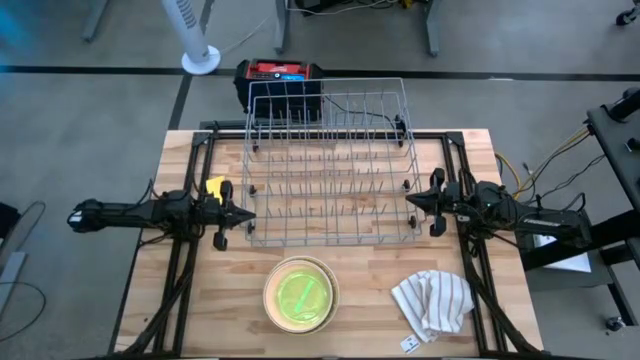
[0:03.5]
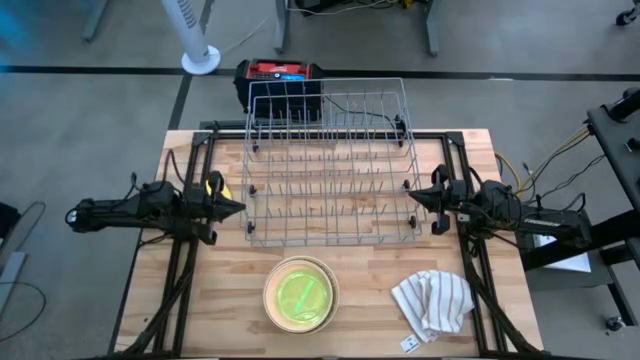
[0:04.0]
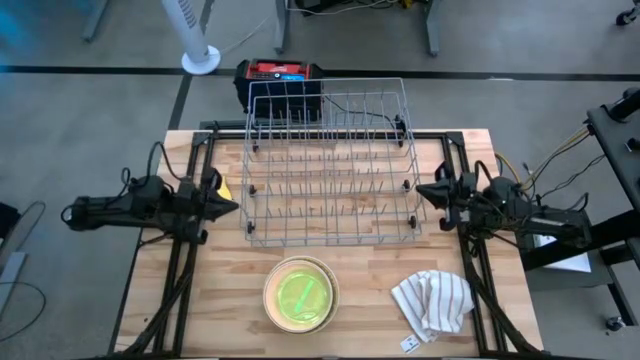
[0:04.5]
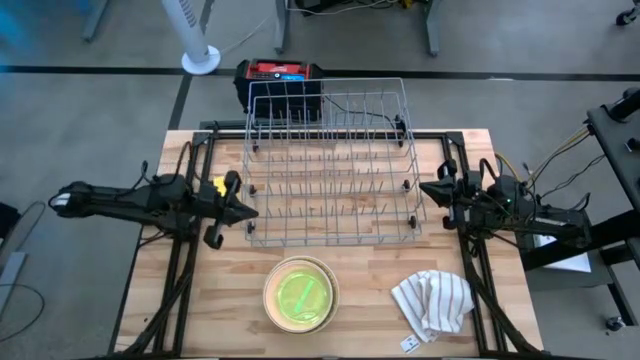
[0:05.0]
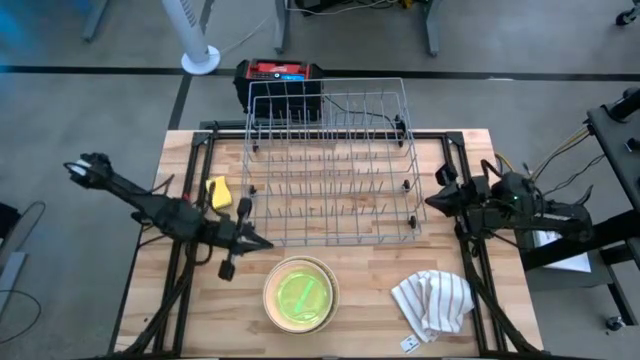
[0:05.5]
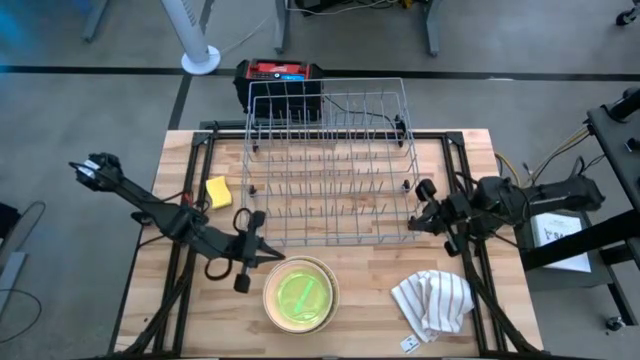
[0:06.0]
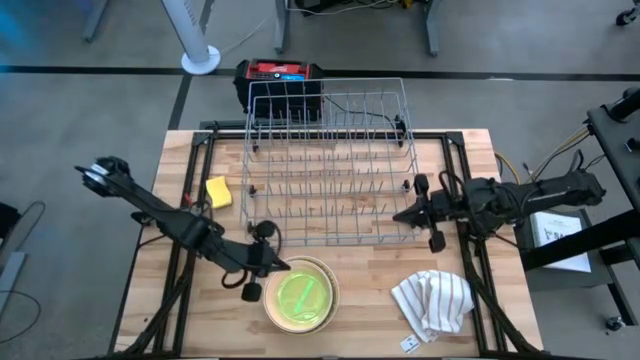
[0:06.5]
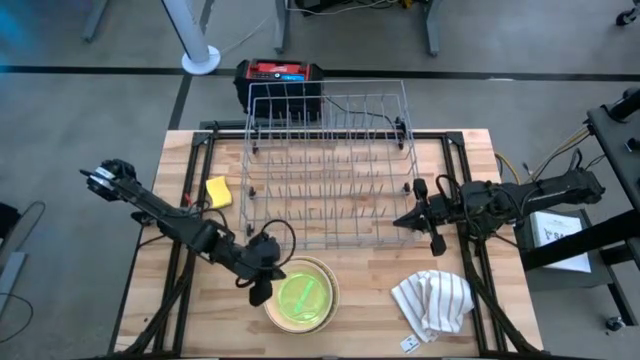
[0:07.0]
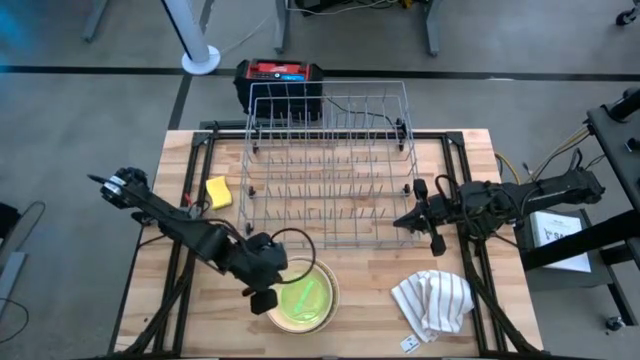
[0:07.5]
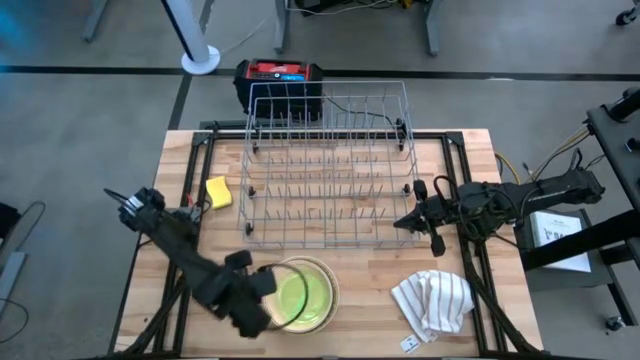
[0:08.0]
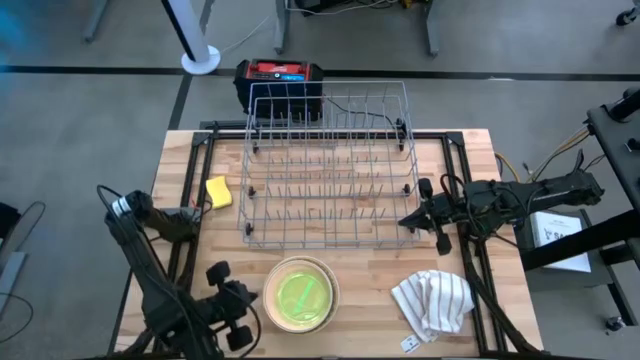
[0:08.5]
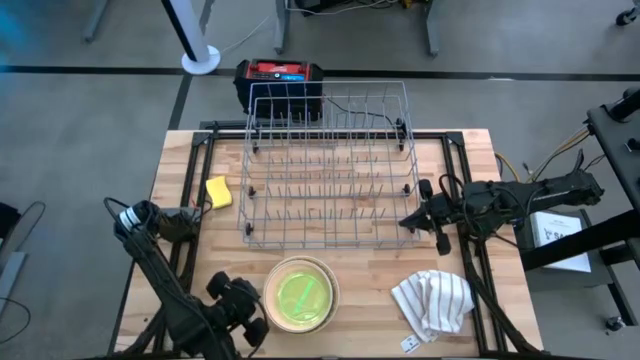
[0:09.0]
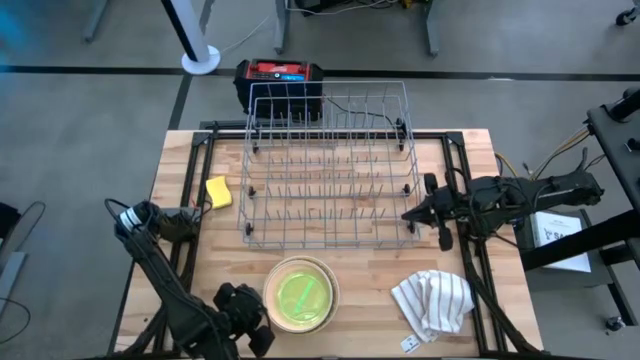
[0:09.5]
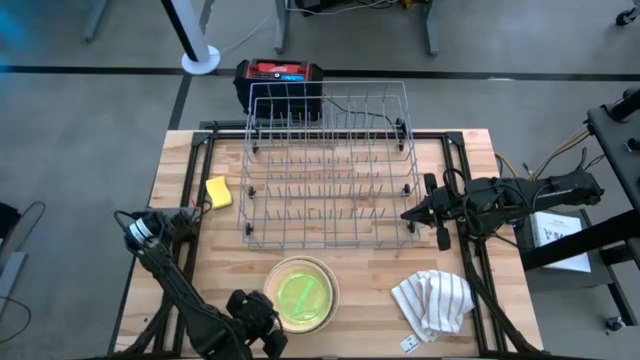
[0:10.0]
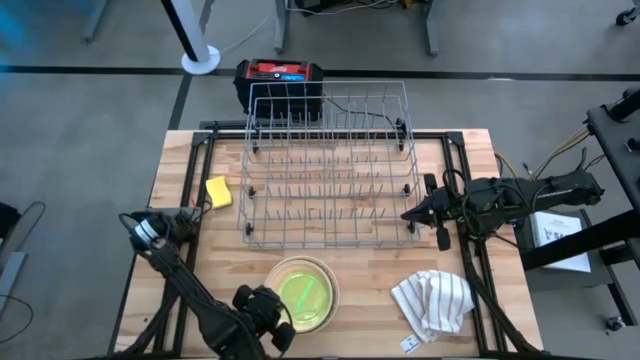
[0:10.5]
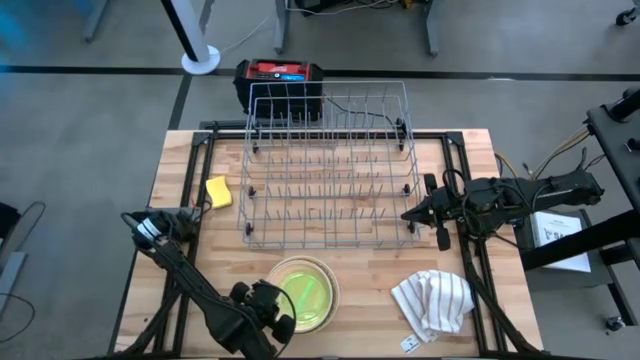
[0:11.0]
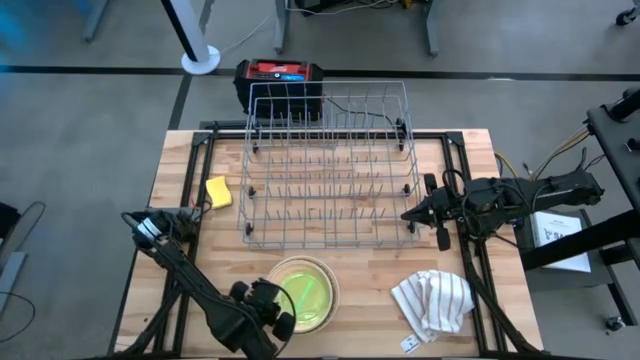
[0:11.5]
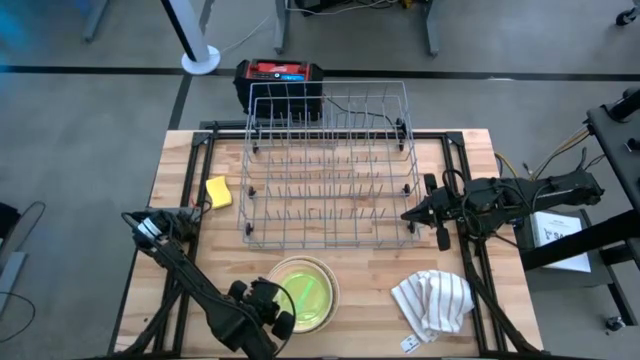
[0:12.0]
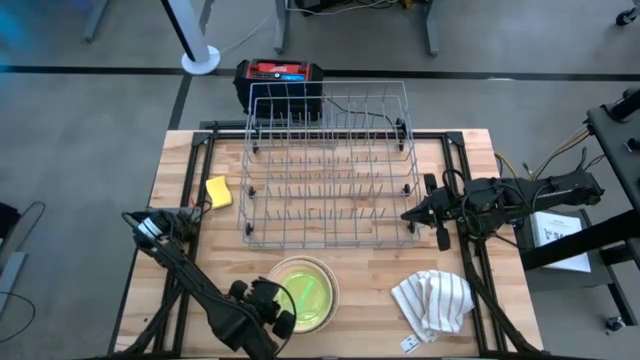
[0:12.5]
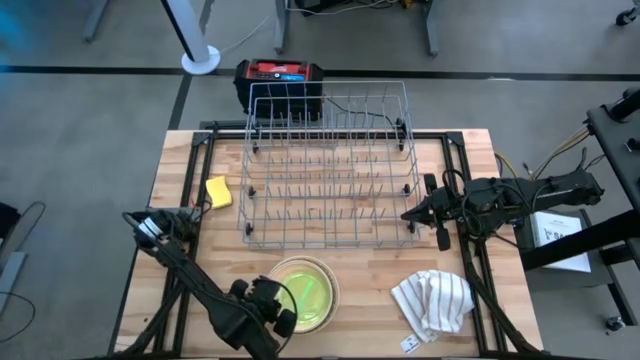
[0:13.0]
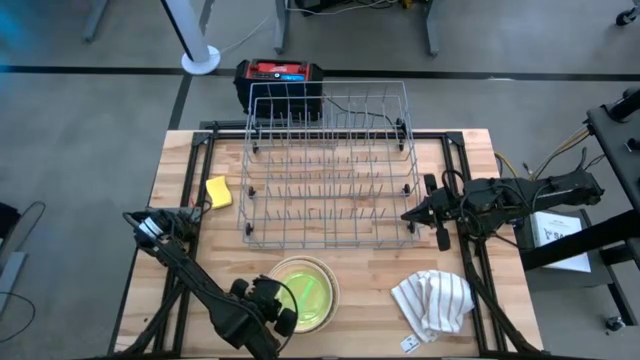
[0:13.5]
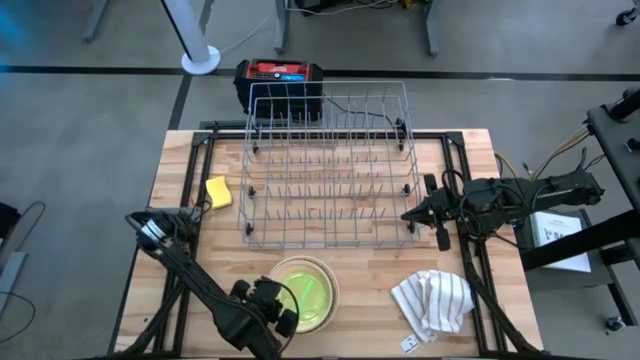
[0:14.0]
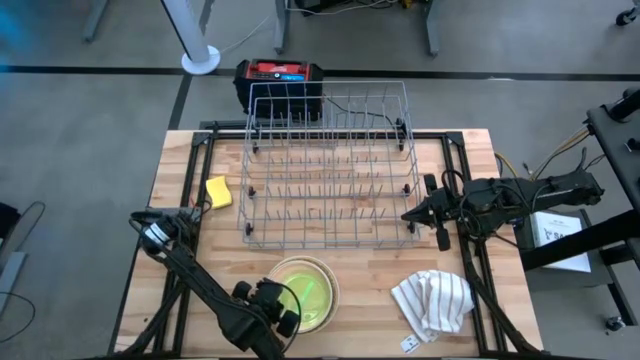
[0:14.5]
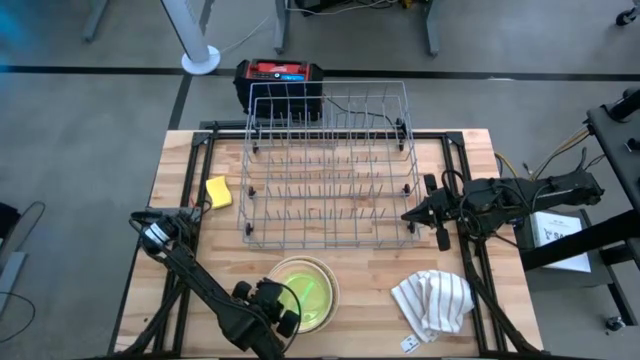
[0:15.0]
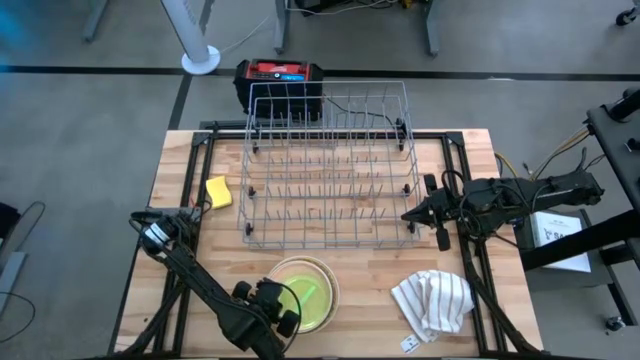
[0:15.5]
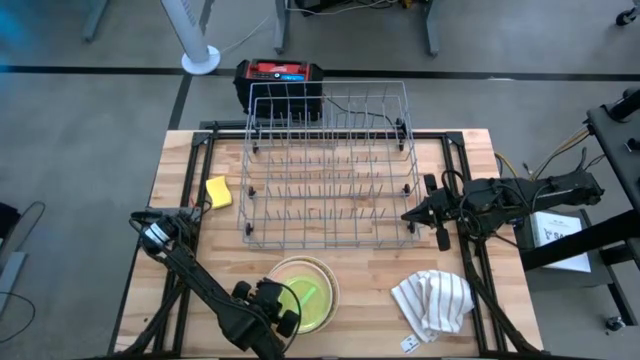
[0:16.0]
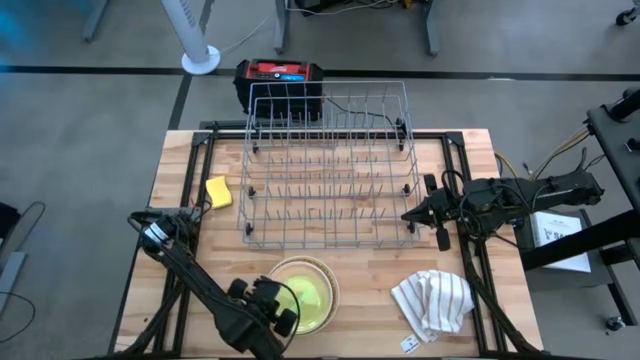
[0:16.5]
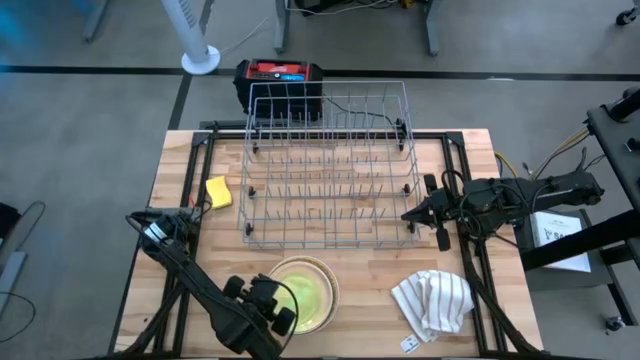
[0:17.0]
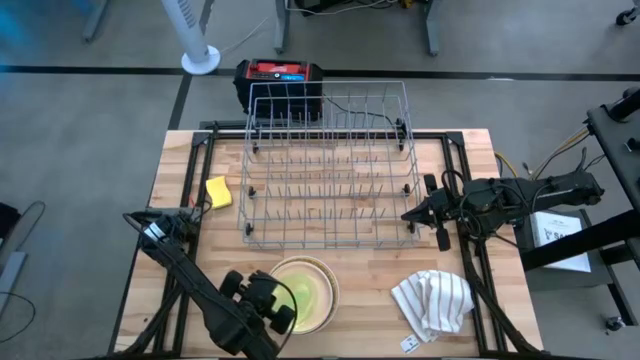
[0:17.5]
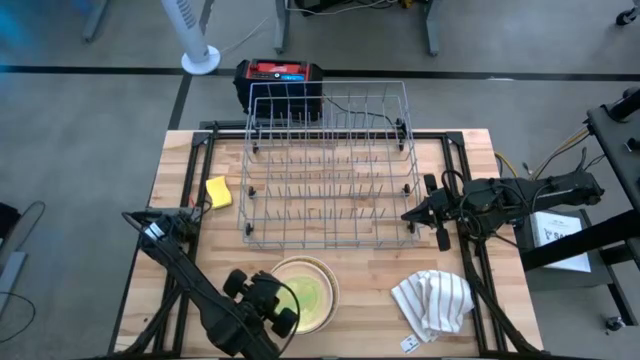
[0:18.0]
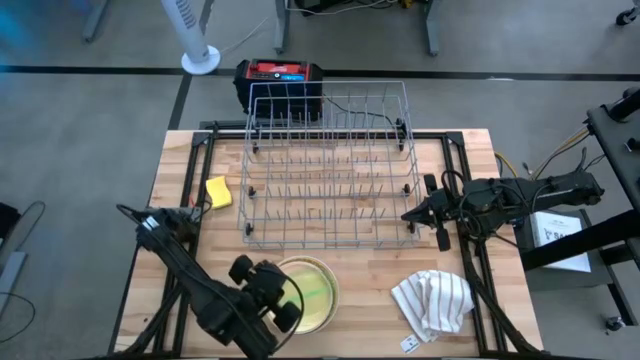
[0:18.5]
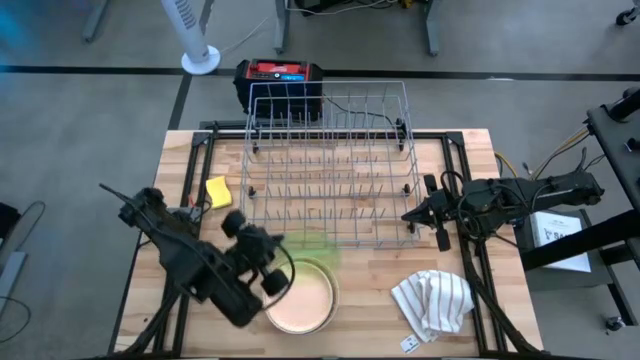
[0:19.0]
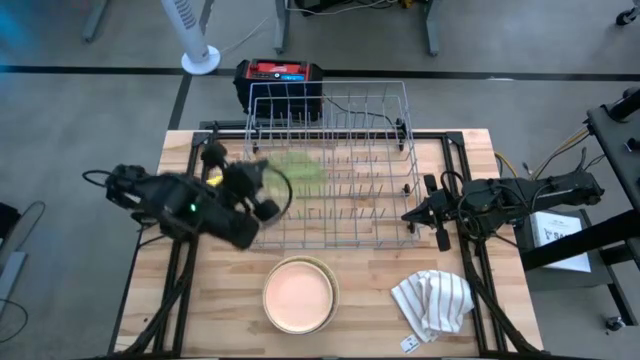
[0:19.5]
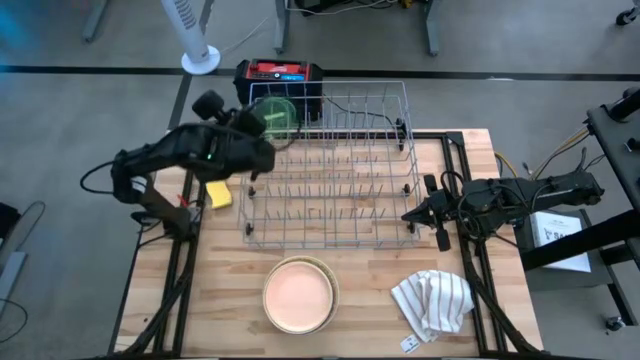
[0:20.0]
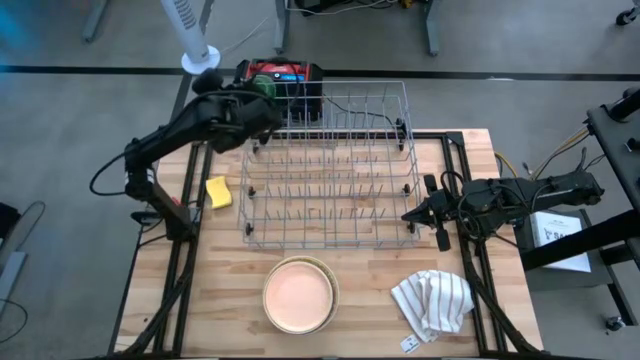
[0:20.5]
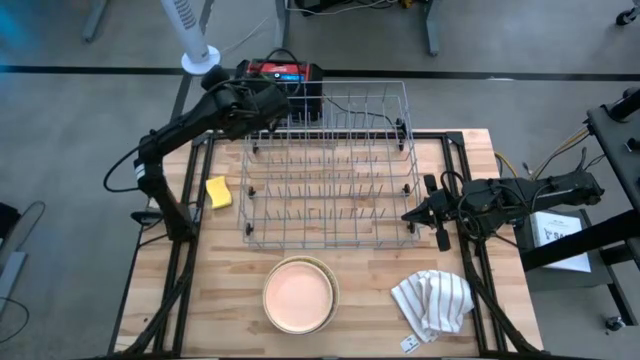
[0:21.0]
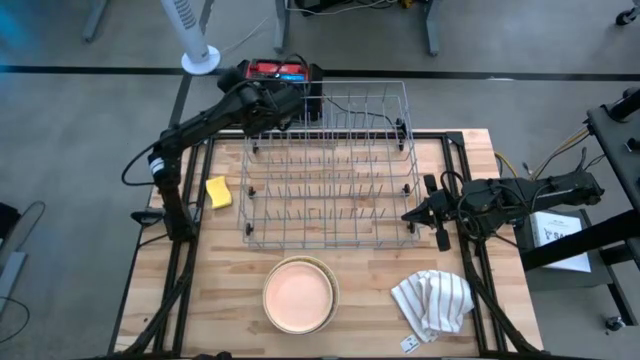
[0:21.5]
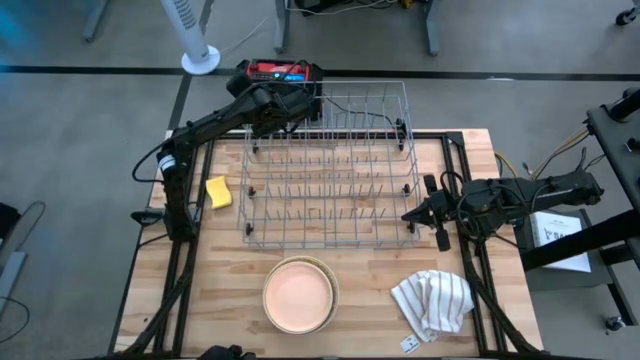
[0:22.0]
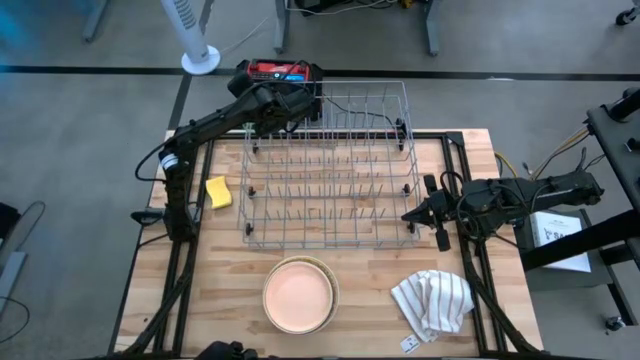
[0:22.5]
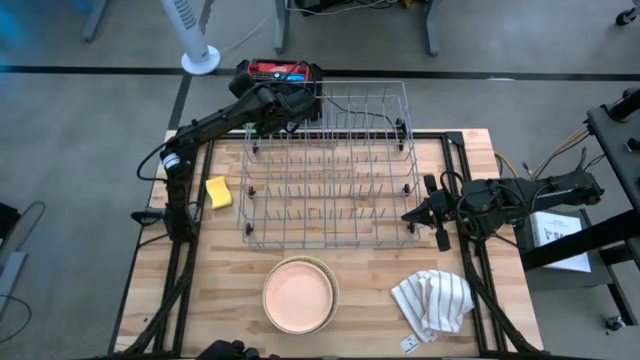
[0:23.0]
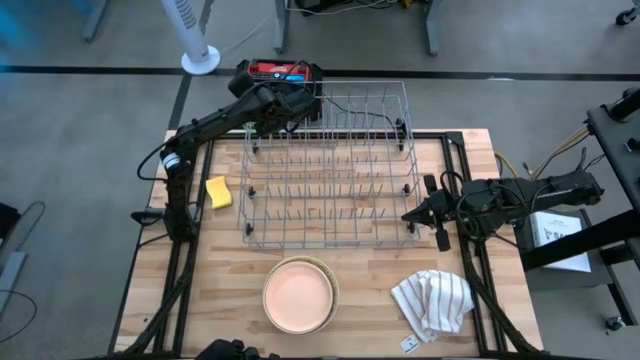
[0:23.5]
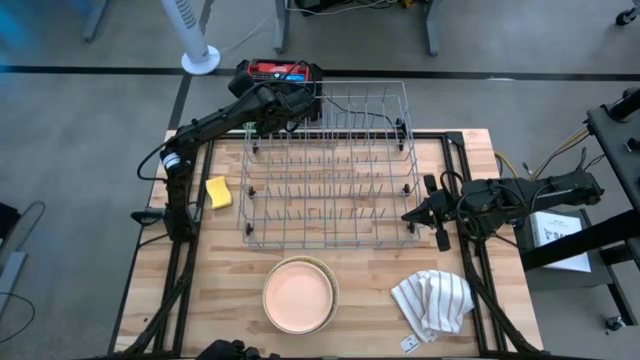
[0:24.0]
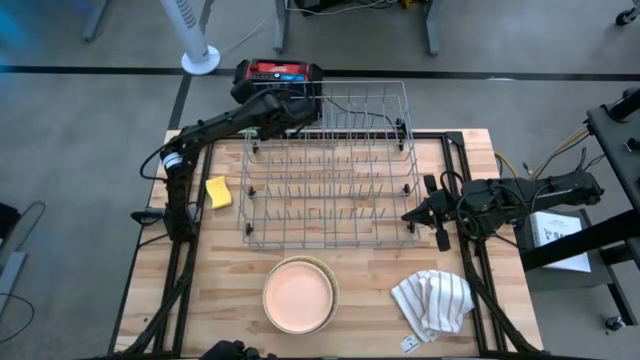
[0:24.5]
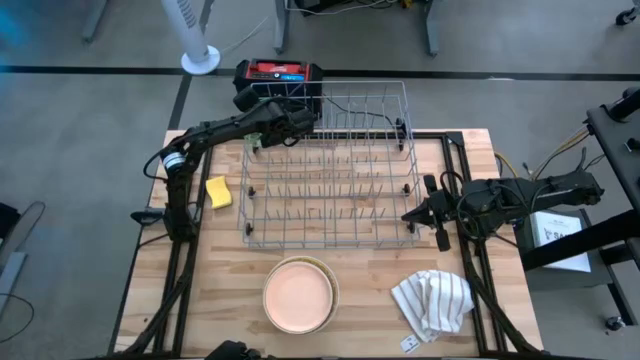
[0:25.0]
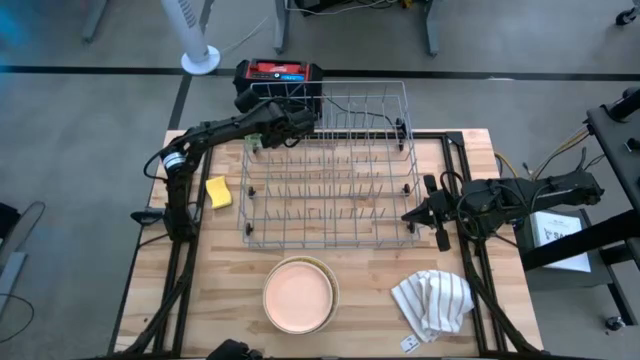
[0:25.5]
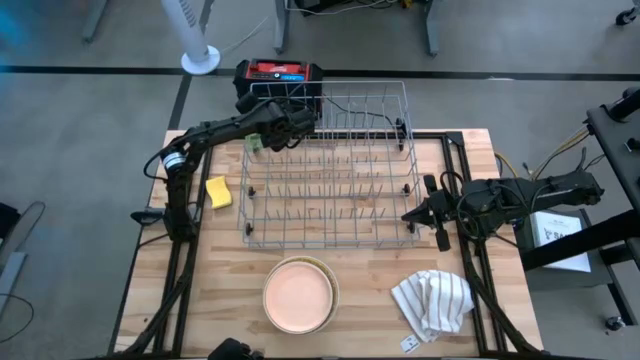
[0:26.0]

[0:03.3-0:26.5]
Task: Sort dishes
Put the green transparent plate into the dish rack
